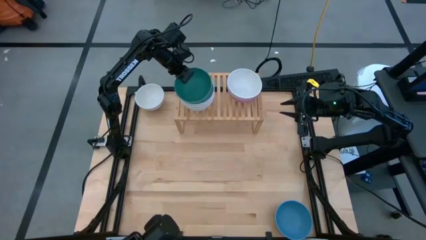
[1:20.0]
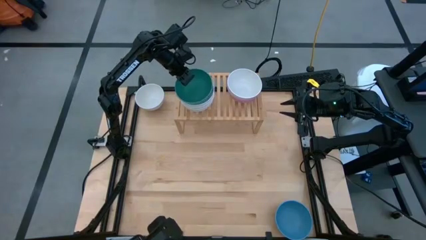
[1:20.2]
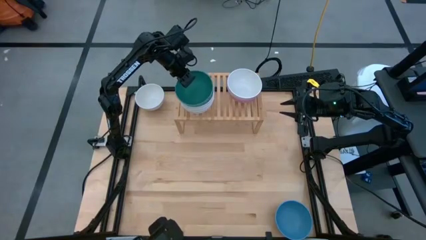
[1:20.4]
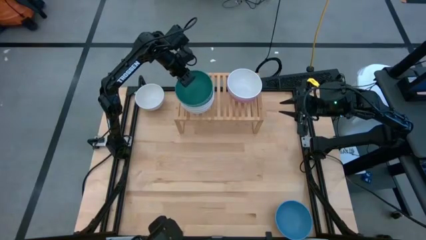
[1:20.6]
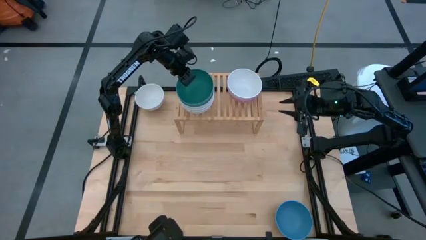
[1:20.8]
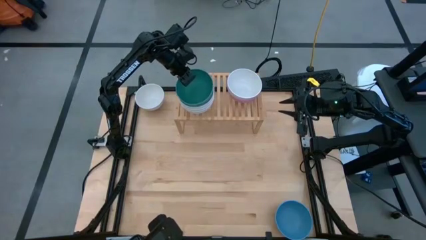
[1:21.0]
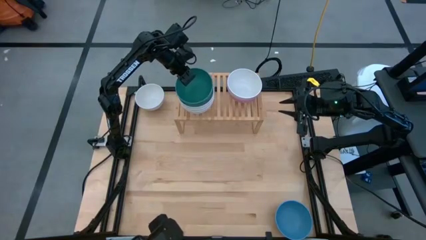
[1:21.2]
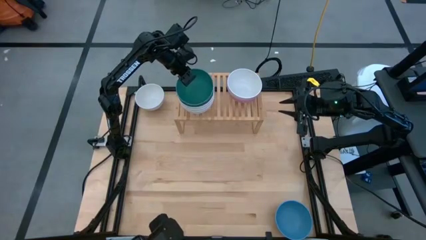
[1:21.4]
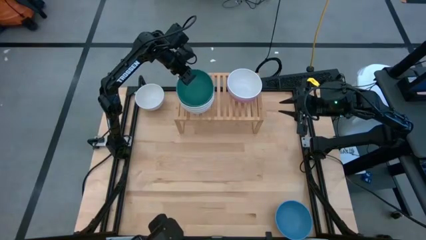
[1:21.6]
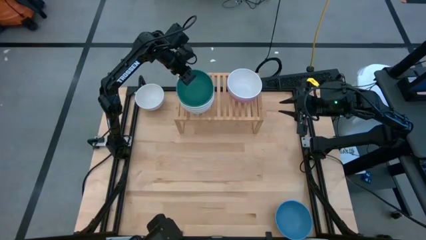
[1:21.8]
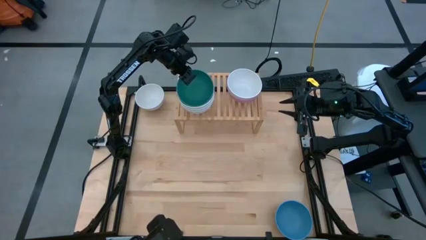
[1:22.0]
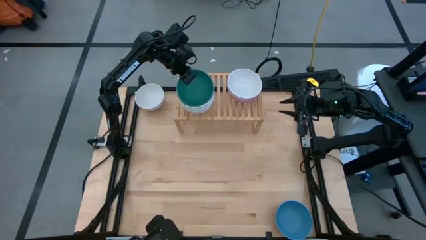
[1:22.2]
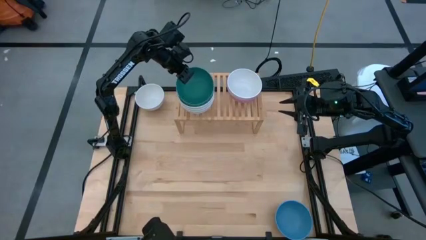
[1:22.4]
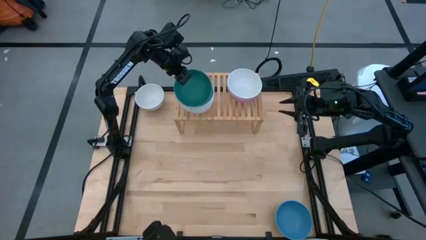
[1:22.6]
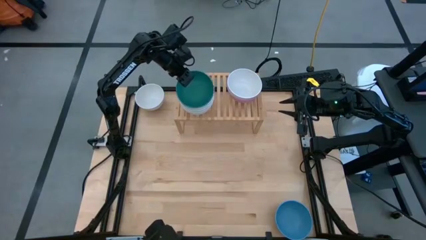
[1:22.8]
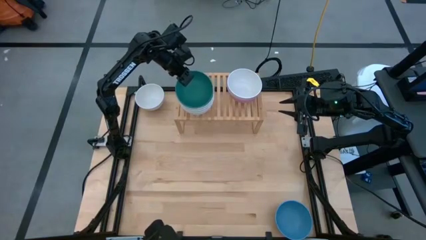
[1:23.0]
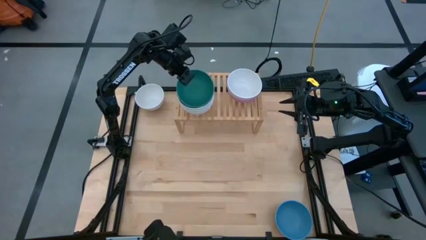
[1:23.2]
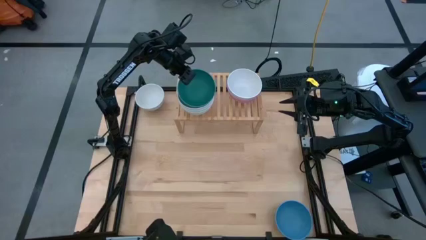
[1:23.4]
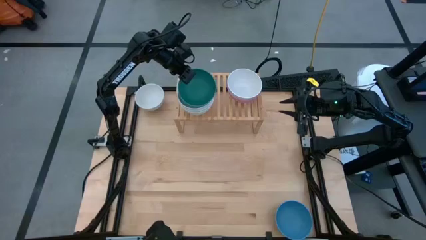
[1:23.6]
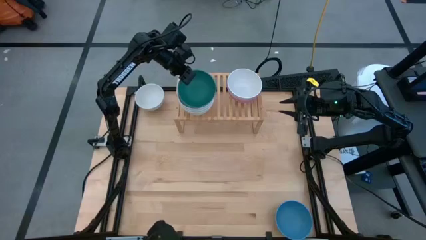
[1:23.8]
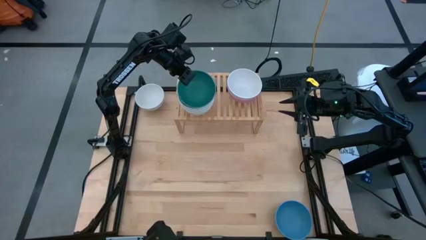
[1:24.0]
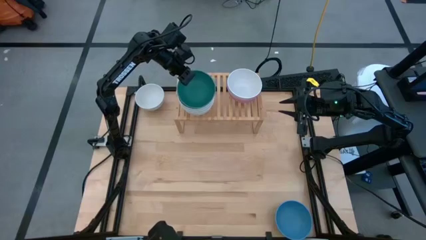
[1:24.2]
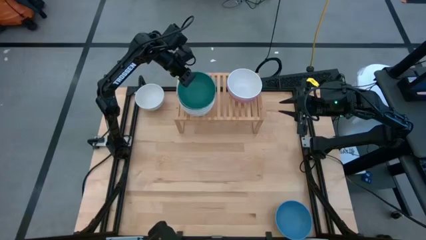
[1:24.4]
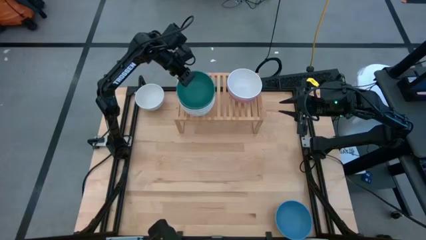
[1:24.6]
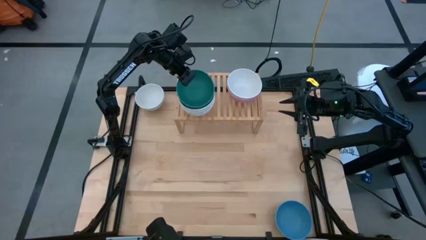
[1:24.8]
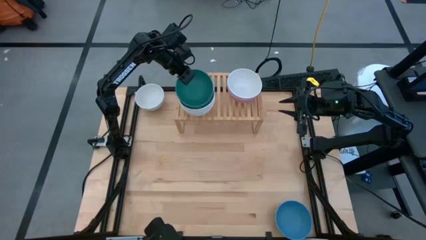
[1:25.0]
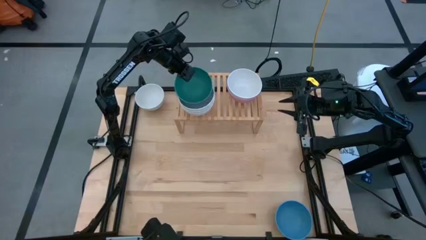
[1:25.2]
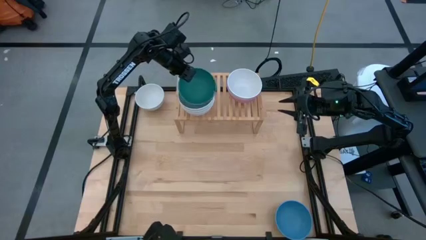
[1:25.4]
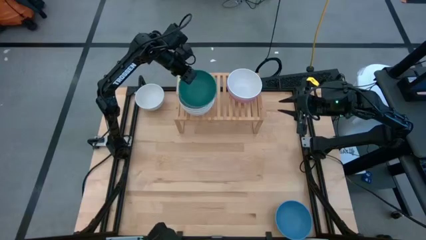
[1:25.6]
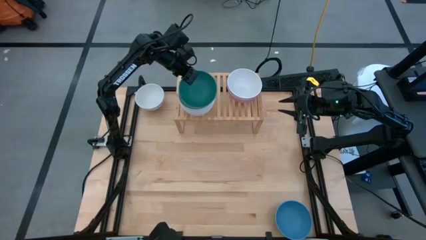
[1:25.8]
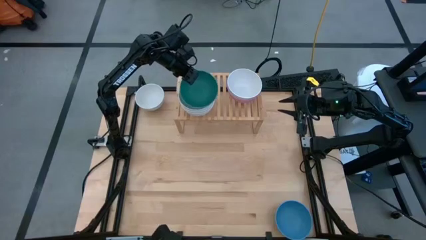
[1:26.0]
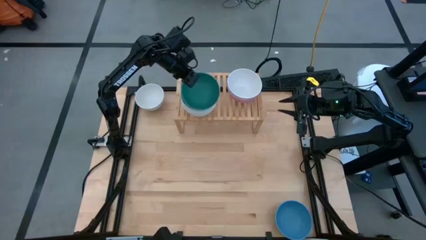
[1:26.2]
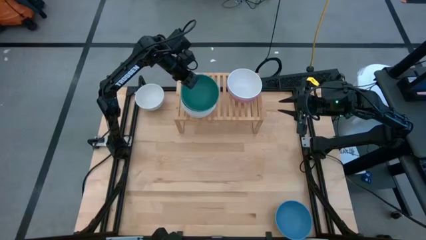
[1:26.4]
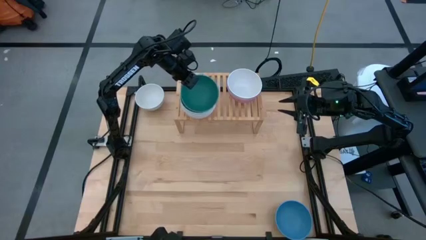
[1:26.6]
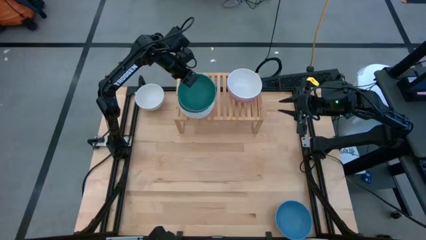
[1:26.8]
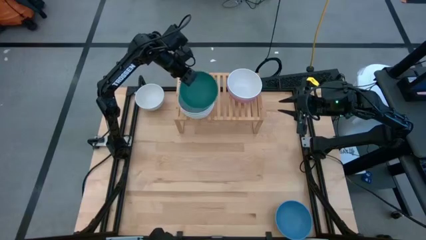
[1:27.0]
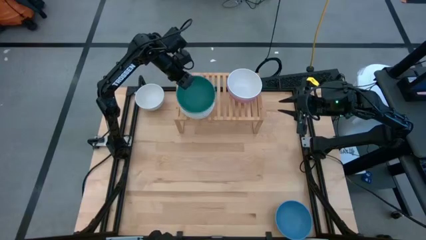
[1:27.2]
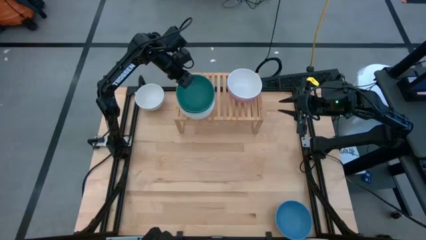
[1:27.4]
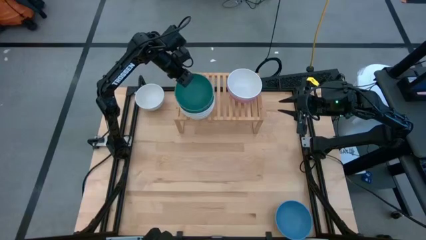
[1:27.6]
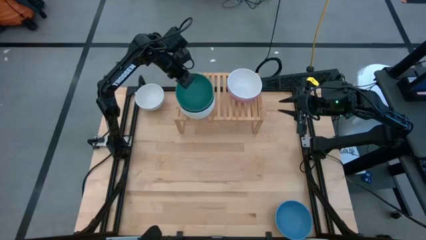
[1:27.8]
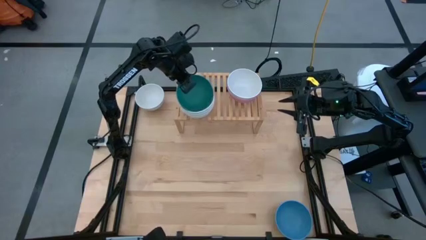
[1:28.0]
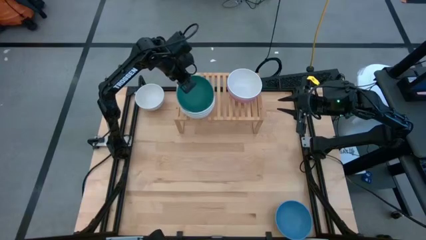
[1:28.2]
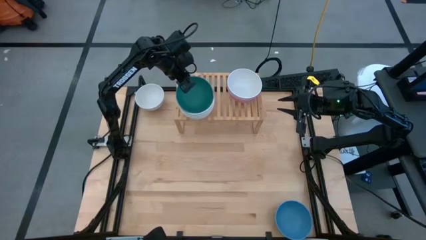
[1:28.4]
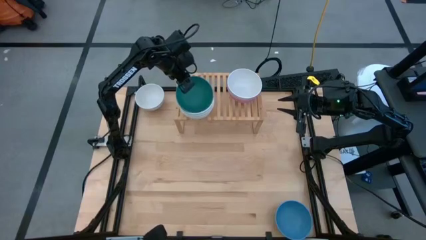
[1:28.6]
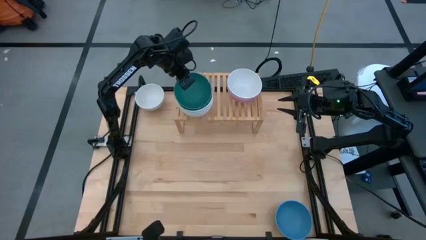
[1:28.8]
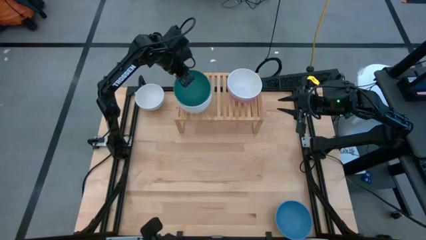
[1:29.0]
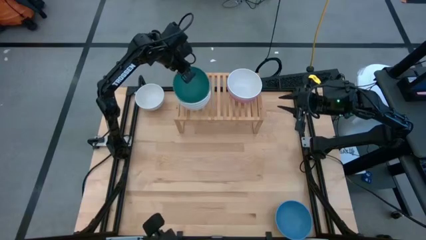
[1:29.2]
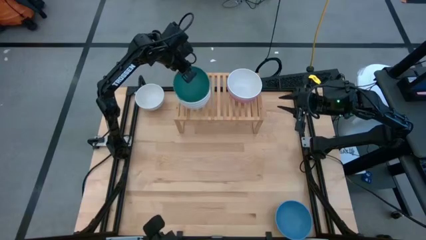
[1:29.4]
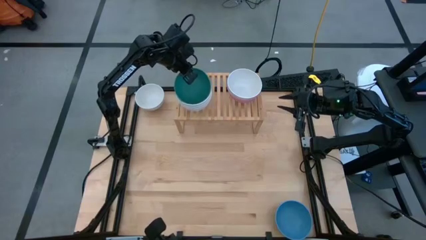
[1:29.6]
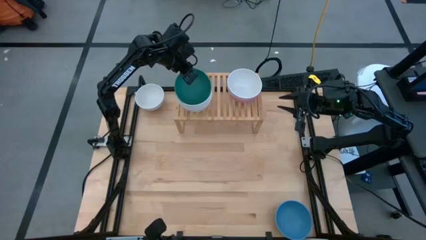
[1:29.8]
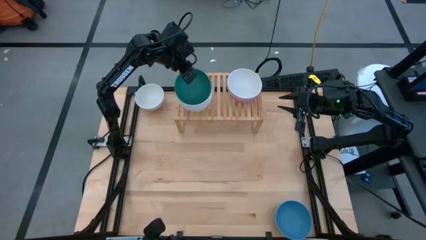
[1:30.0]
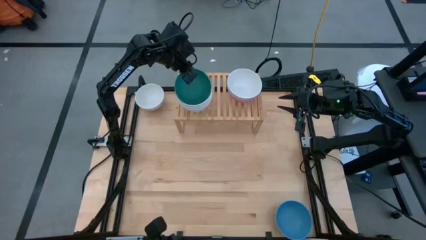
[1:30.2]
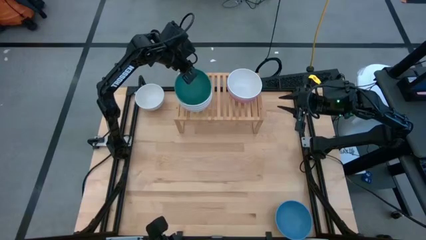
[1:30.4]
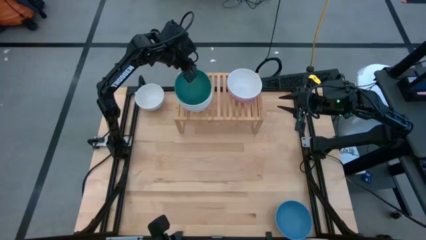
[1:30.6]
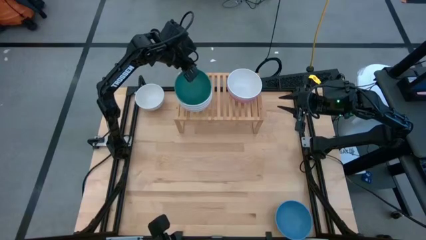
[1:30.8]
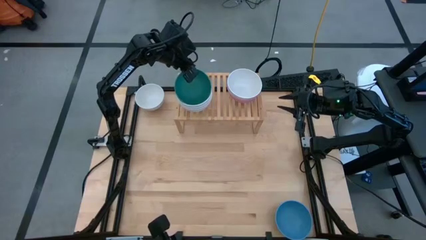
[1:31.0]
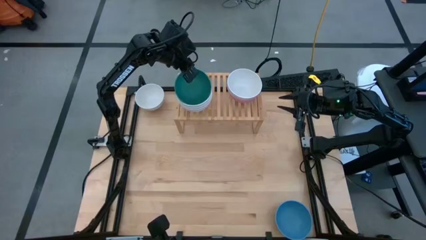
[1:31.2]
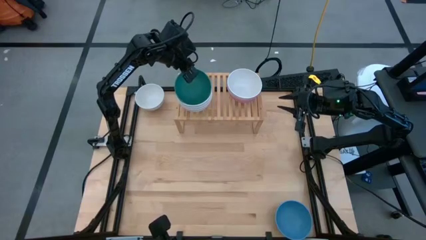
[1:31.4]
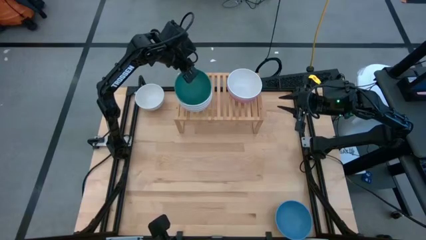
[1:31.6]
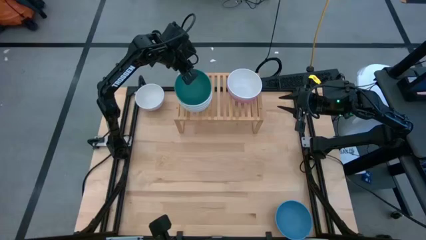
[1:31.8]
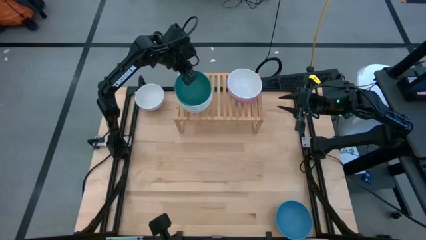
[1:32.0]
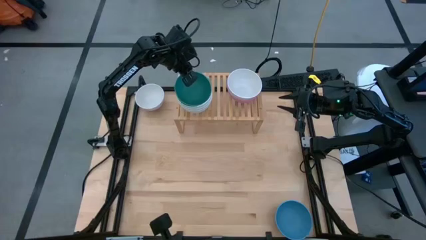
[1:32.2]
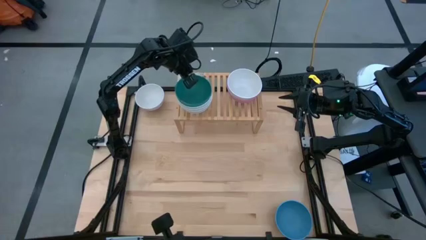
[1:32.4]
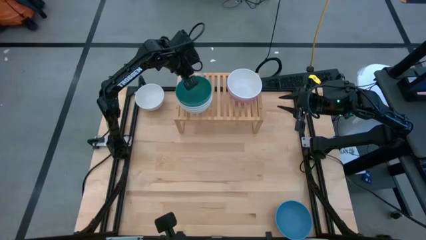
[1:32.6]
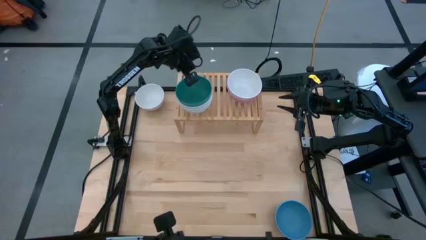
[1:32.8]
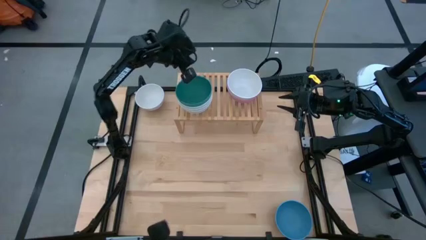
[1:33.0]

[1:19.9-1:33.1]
Task: Place and stack bowls onto a shelf
Stack the green bowl on top of the white bowl on the shelf
